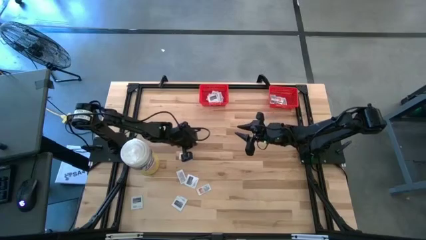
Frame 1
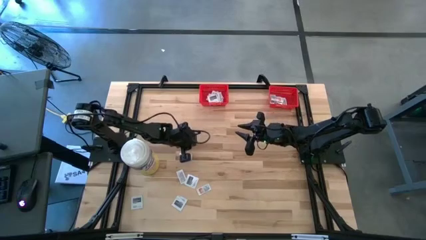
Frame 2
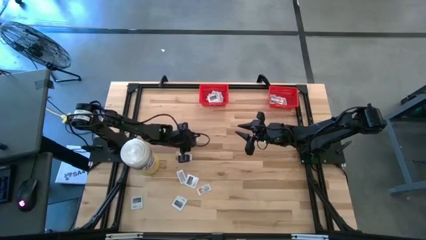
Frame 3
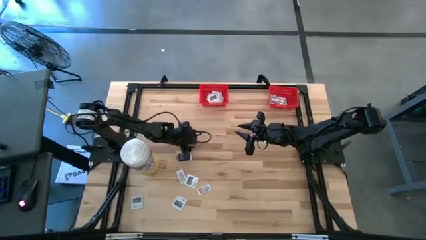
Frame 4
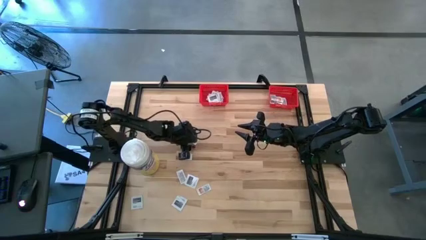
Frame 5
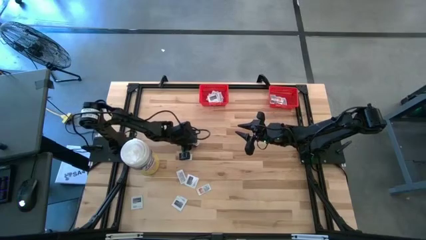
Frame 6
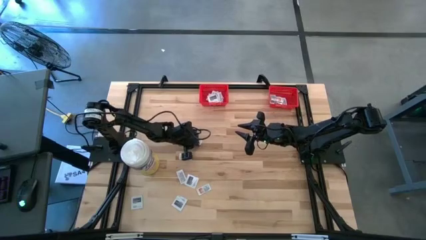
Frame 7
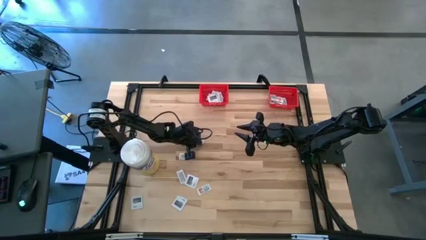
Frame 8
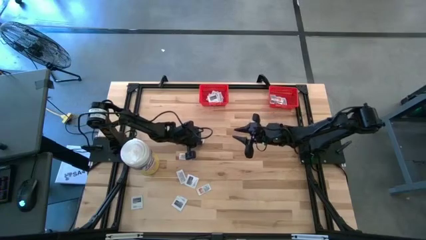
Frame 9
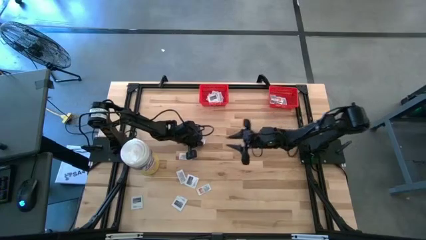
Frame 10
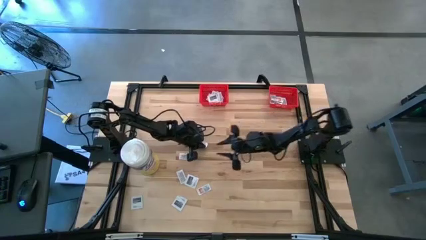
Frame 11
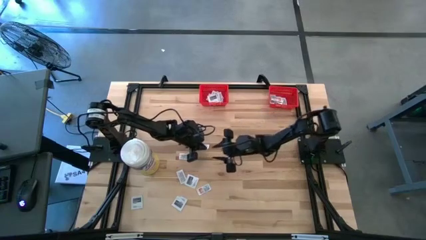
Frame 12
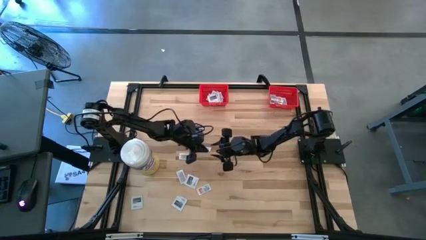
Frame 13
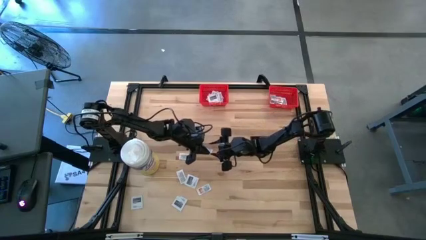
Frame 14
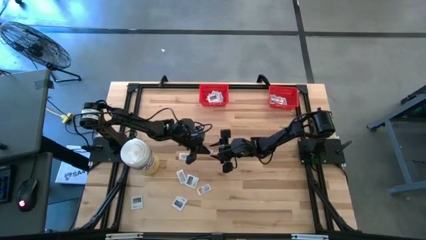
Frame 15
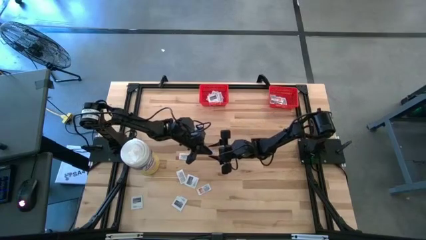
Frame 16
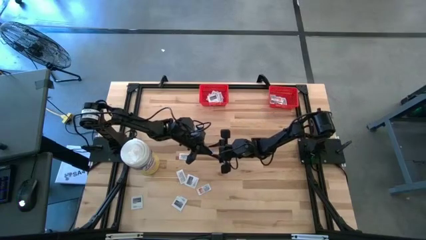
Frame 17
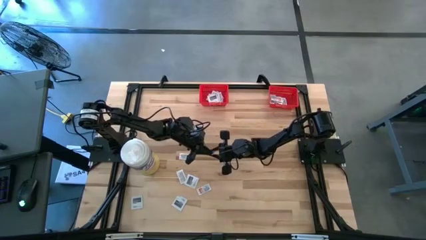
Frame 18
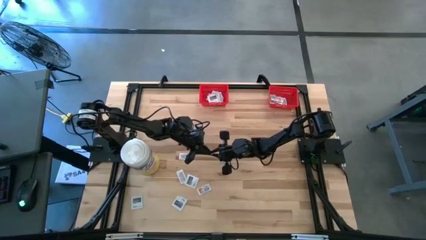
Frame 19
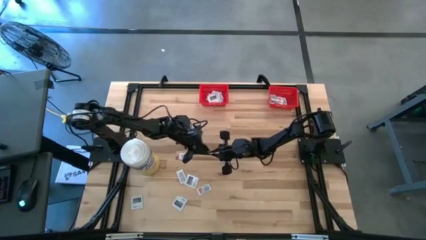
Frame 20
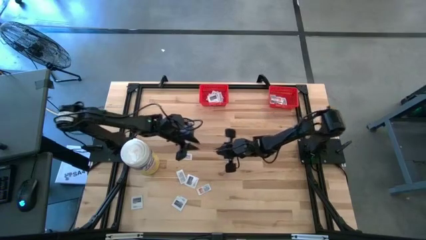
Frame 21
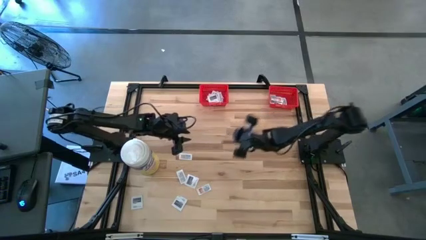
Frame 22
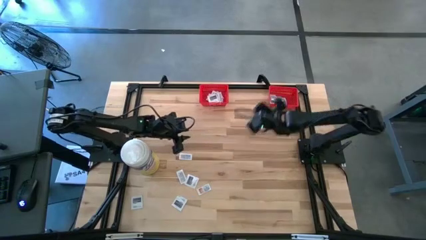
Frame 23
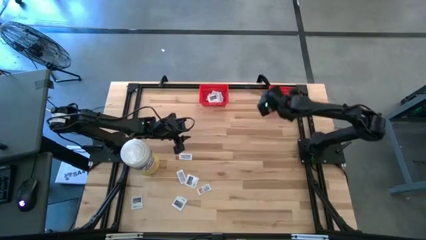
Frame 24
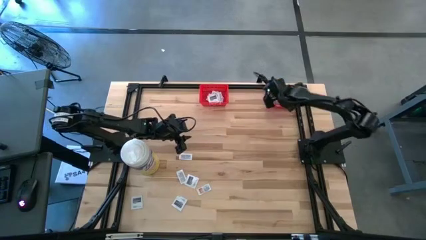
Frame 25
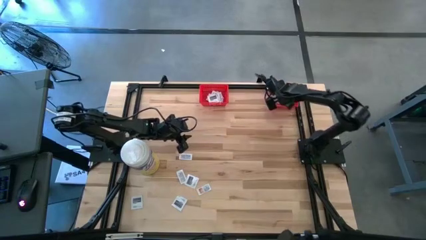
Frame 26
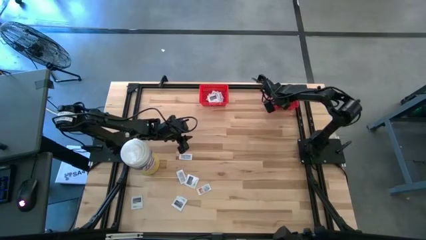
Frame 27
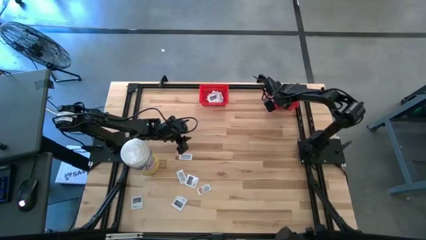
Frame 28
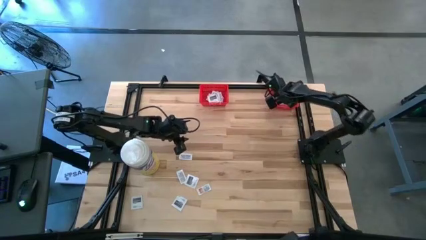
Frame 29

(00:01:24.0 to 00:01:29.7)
Task: Pick & Place First Aid Supplies
Put the ointment pack into the right red bin

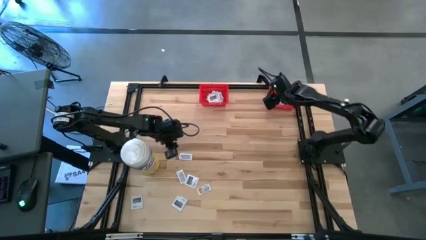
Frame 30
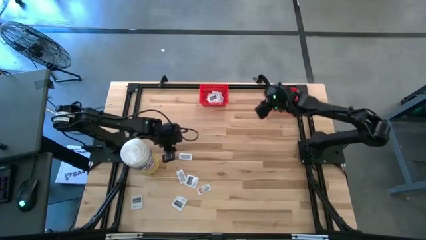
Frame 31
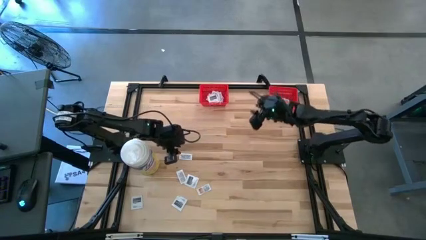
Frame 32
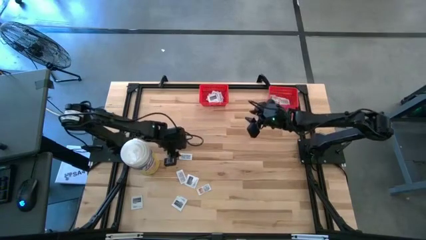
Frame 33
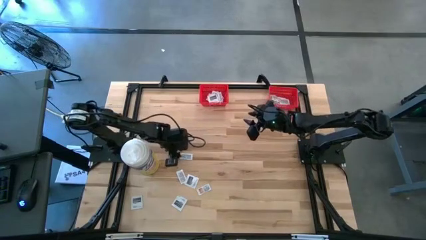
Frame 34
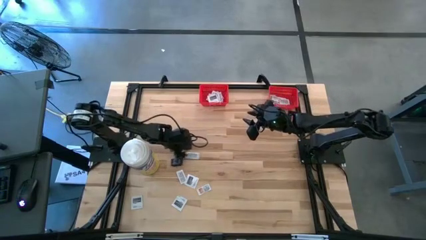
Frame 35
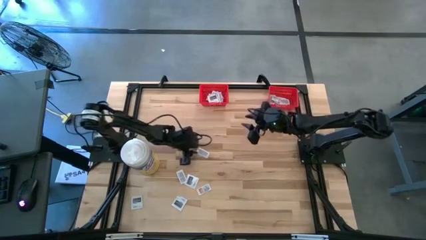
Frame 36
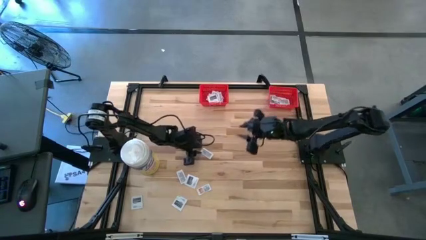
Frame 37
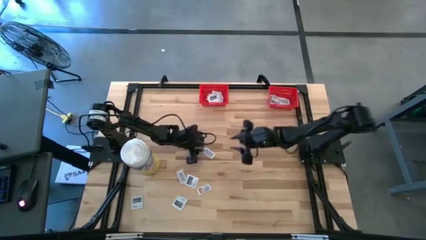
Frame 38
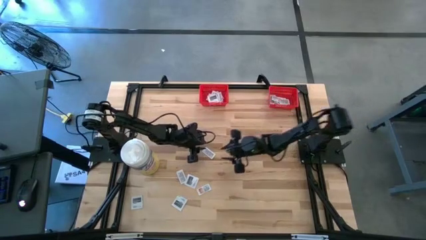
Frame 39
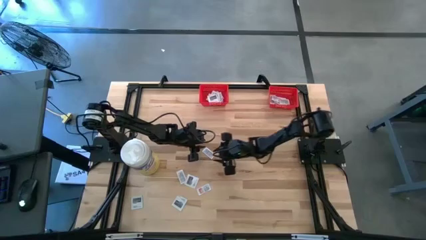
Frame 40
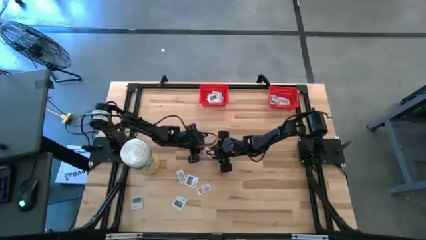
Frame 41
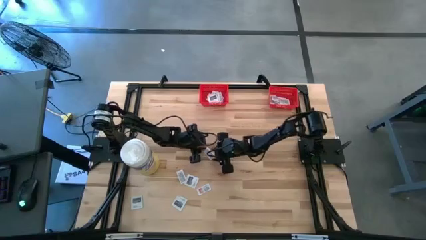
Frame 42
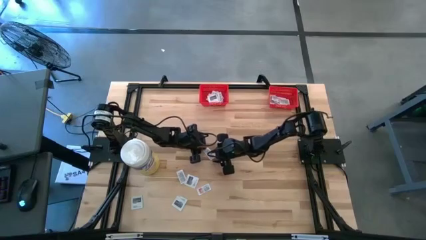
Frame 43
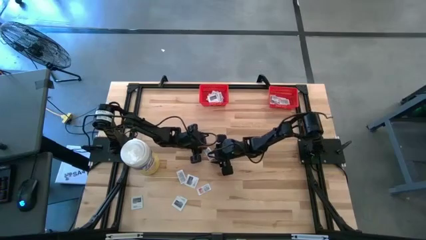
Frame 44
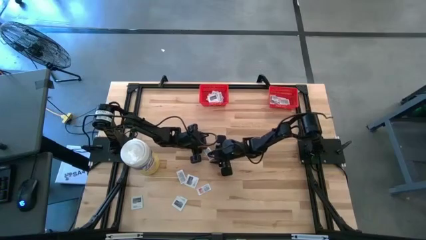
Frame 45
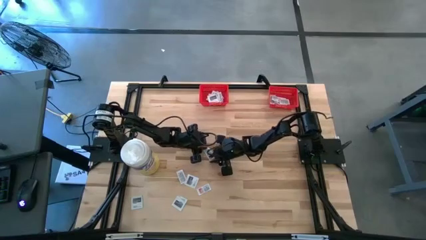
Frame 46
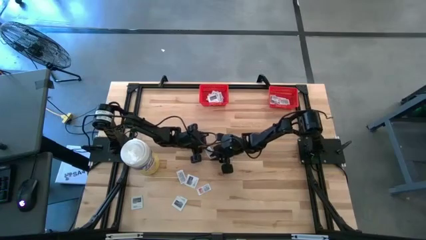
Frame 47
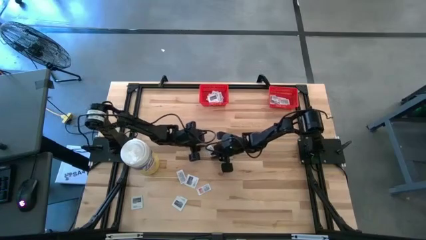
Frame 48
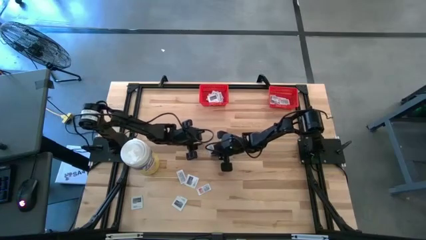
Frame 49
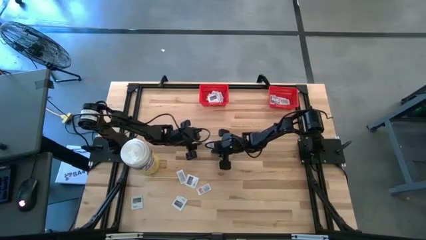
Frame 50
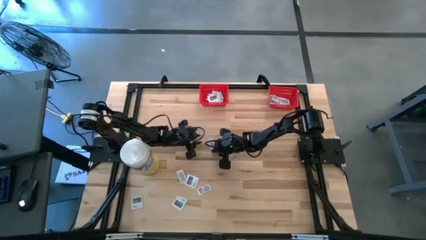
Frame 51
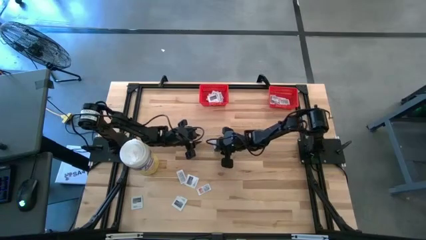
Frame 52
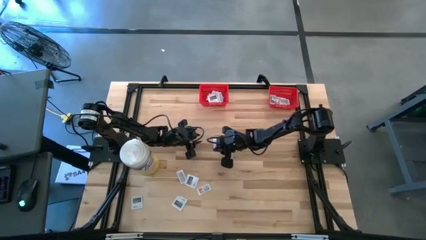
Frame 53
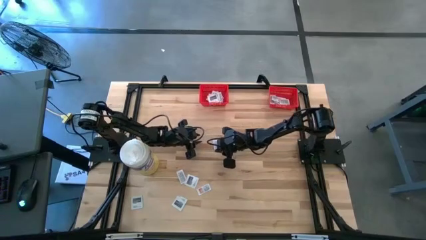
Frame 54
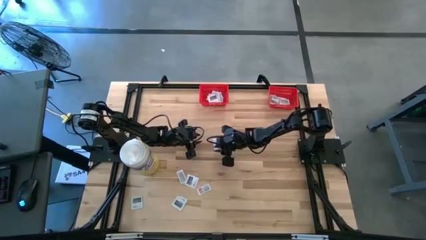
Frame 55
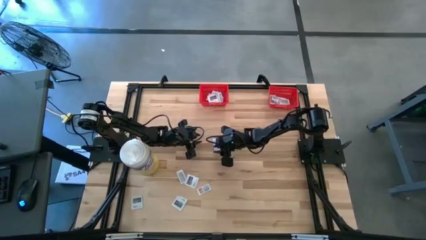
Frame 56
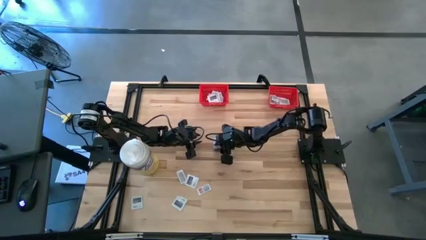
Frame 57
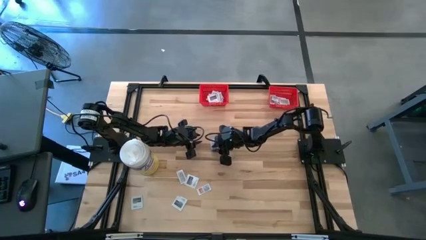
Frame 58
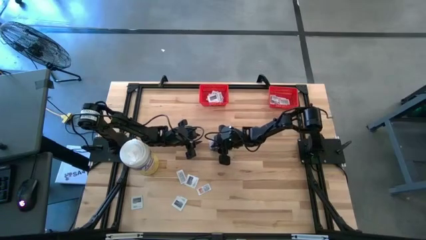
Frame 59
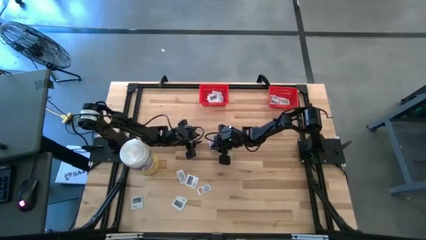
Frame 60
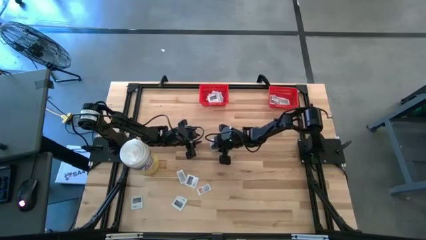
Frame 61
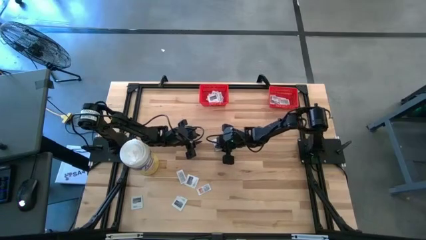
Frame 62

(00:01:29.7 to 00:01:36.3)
Put the ointment pack into the right red bin

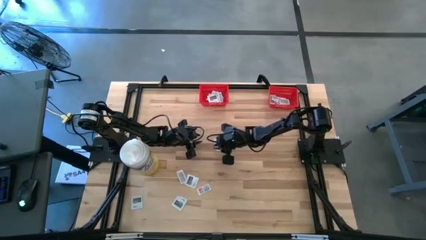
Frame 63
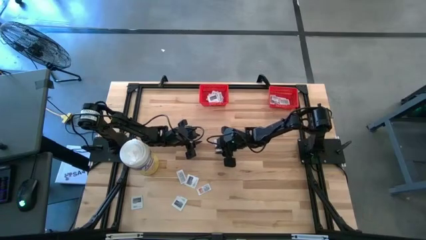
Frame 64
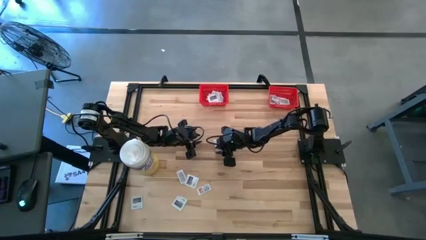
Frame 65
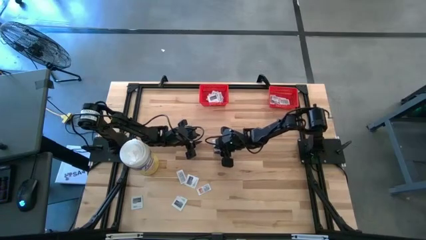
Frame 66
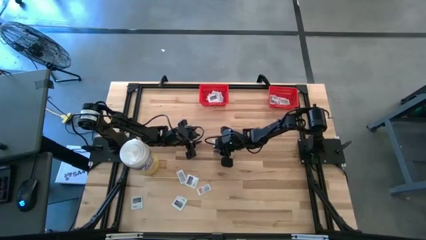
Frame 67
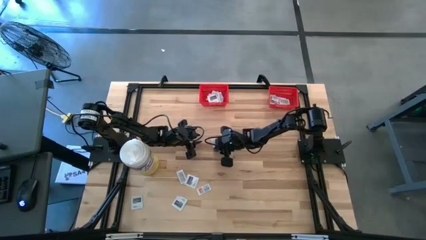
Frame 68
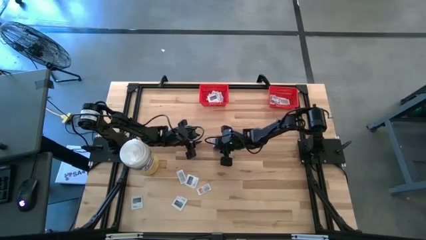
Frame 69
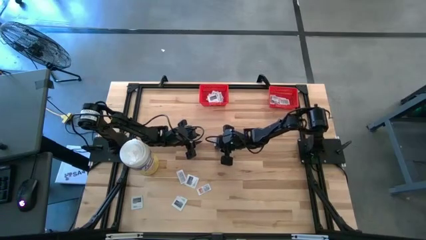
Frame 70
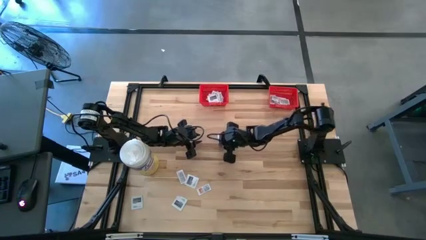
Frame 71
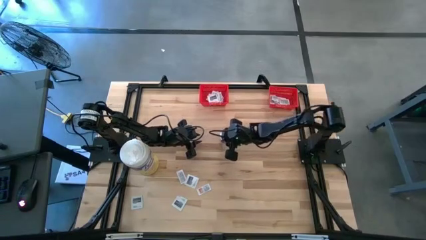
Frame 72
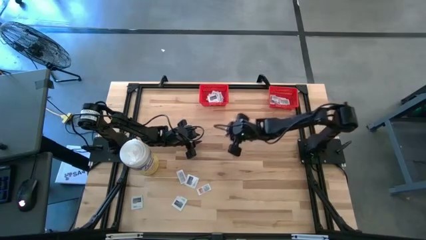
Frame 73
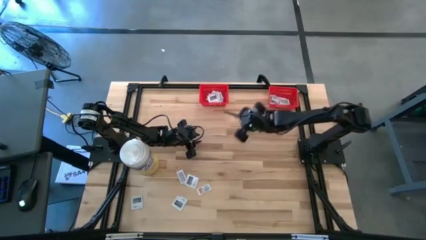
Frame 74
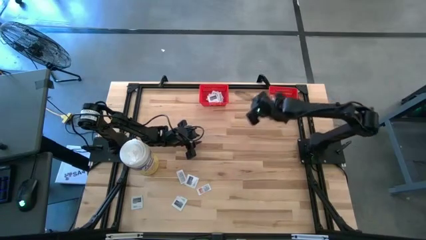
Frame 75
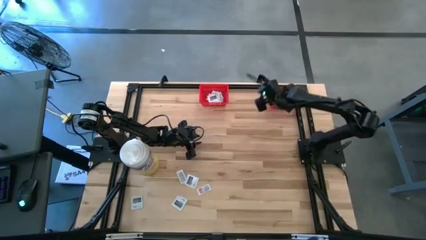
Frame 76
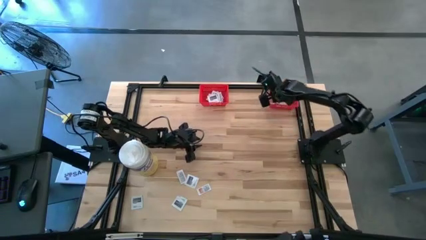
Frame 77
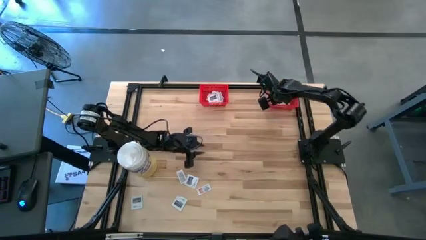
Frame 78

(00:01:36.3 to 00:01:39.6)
Put the ointment pack into the right red bin

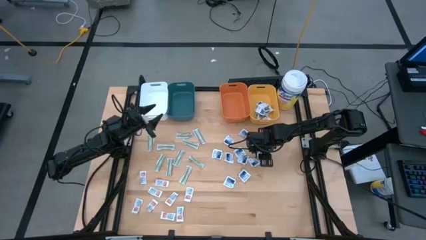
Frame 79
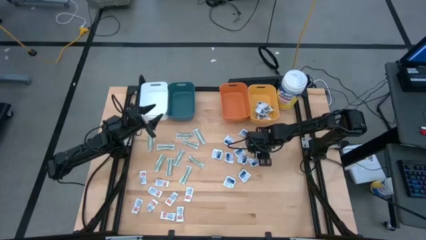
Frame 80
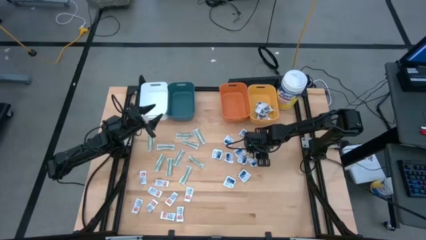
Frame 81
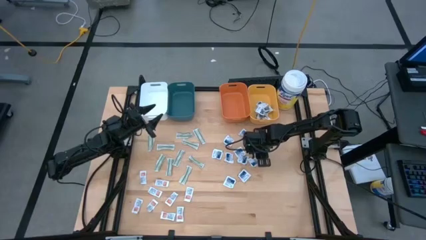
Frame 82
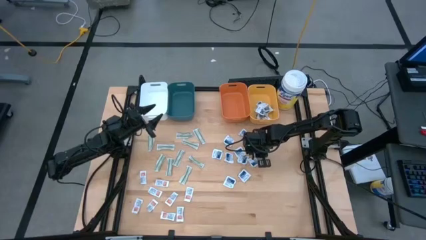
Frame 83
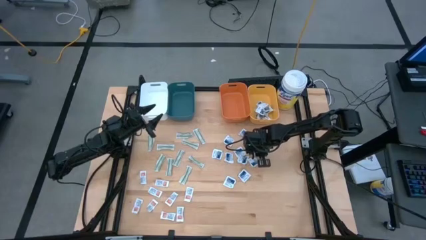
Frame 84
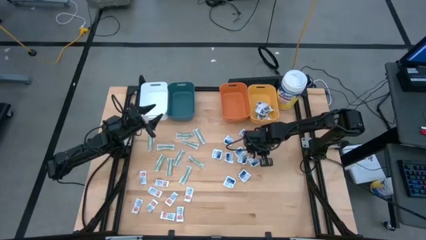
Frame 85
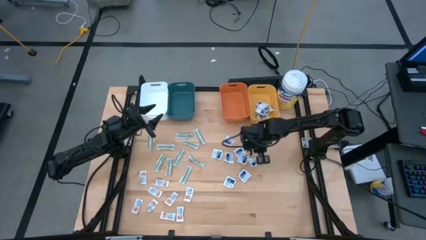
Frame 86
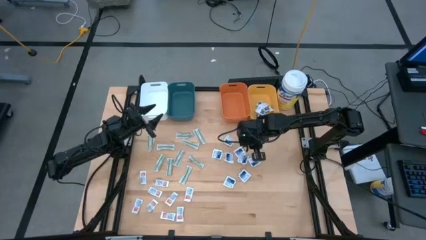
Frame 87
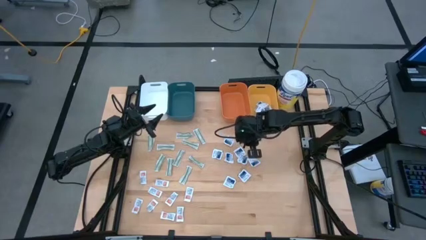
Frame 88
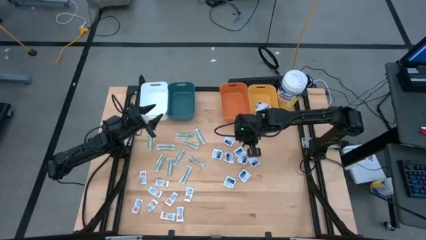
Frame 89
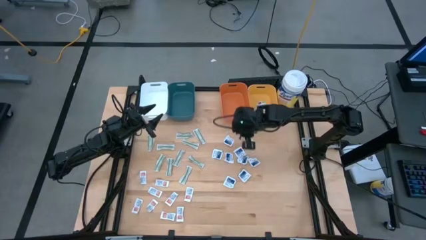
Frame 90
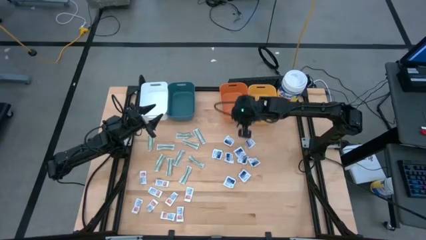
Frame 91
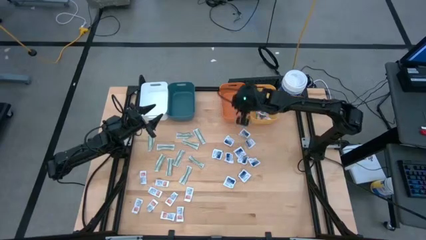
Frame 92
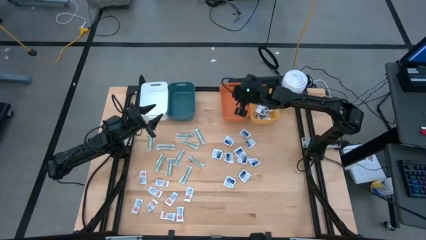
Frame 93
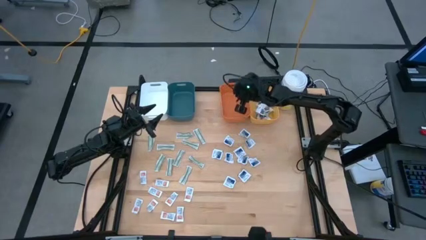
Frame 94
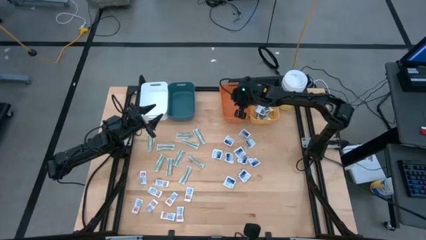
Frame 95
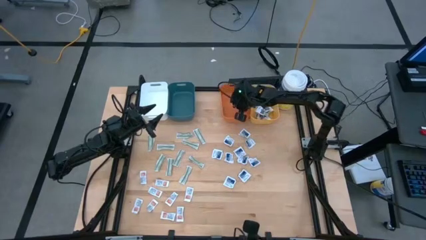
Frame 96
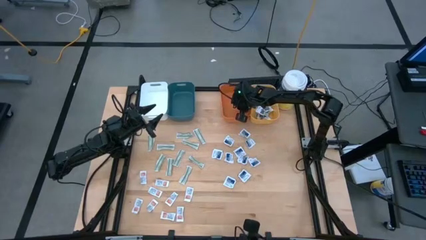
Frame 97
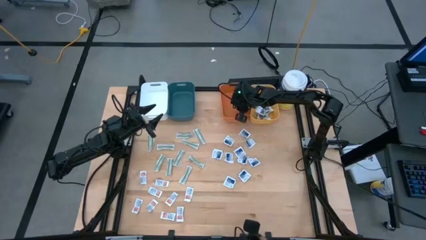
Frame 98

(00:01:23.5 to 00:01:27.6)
Task: Pick & Place First Aid Supplies
Put the alcohol pad into the orange bin
